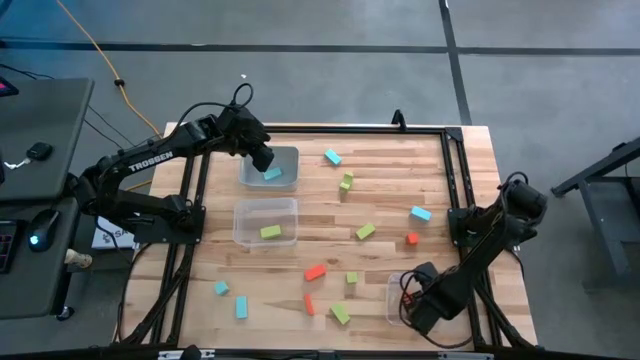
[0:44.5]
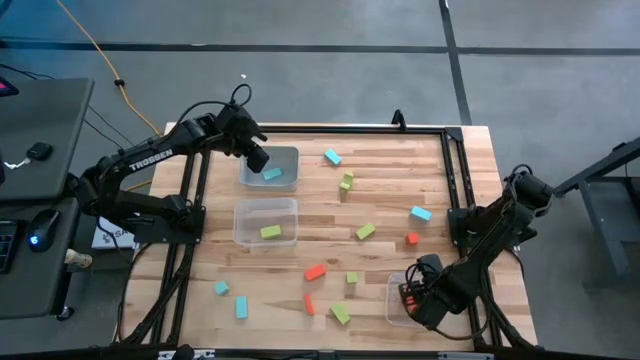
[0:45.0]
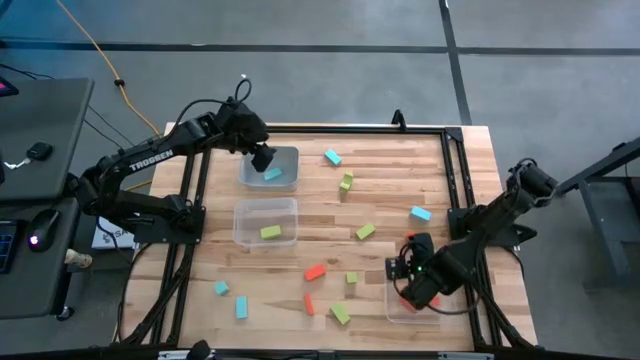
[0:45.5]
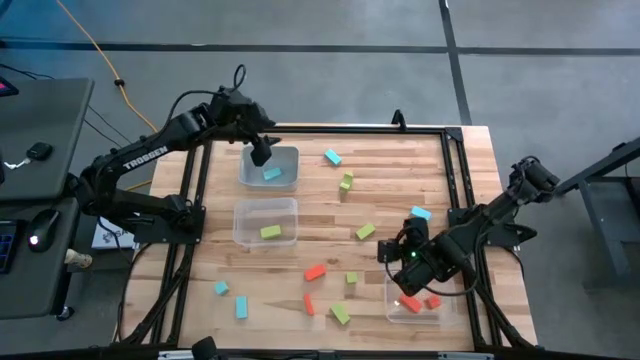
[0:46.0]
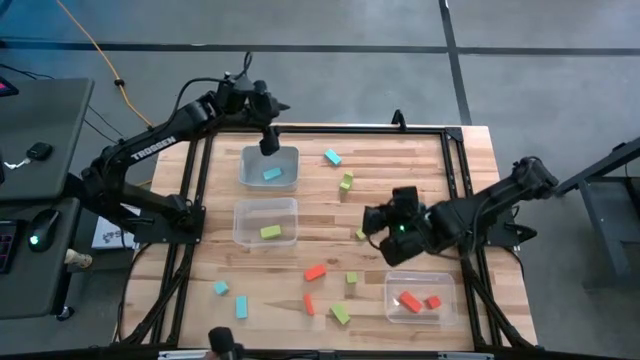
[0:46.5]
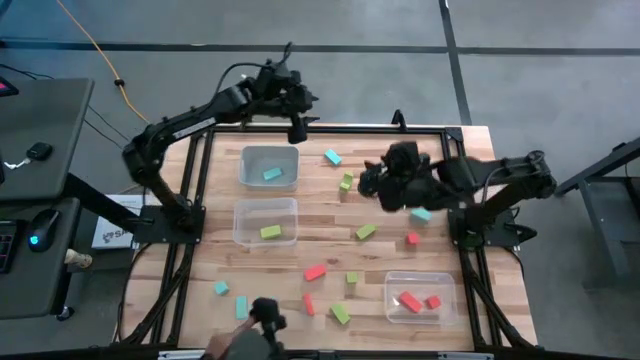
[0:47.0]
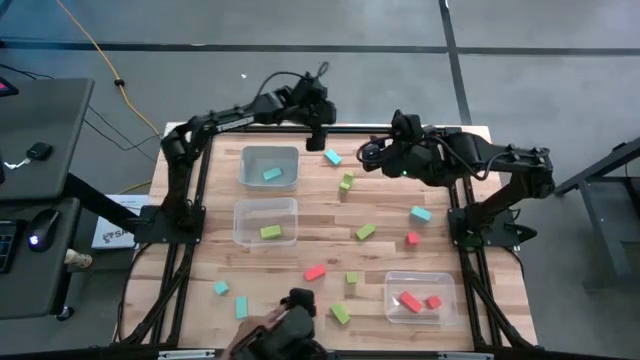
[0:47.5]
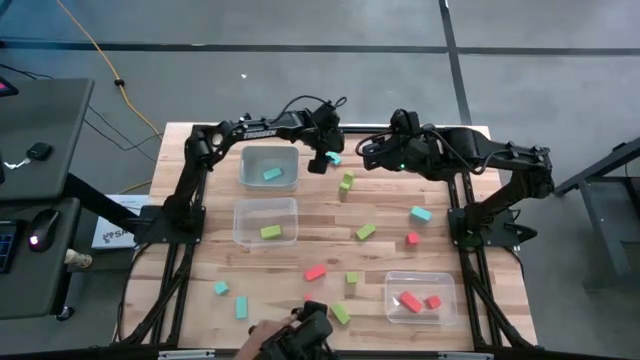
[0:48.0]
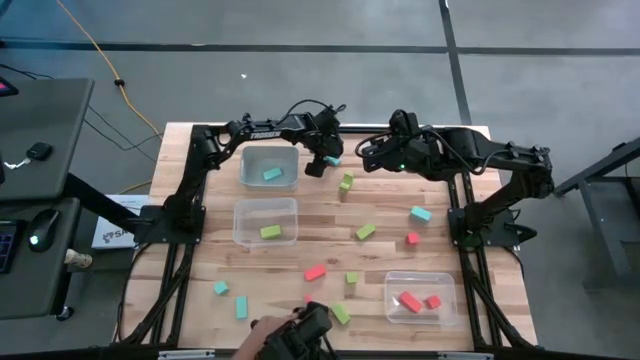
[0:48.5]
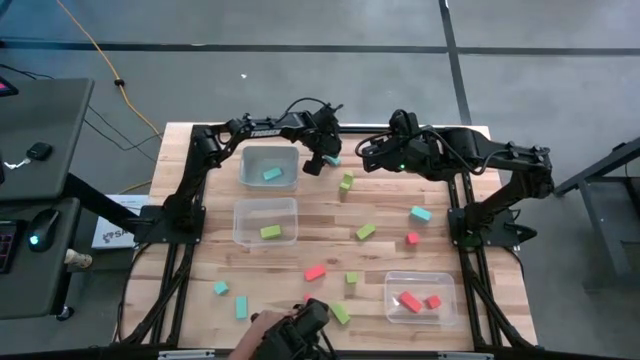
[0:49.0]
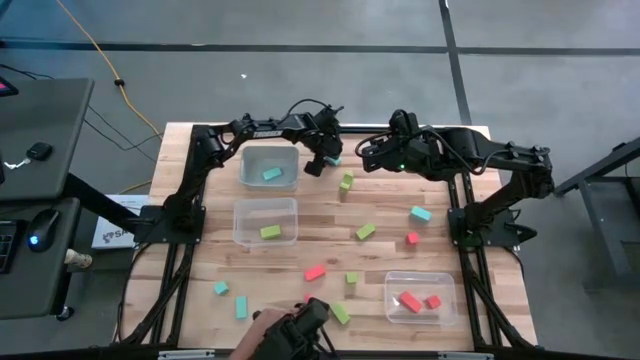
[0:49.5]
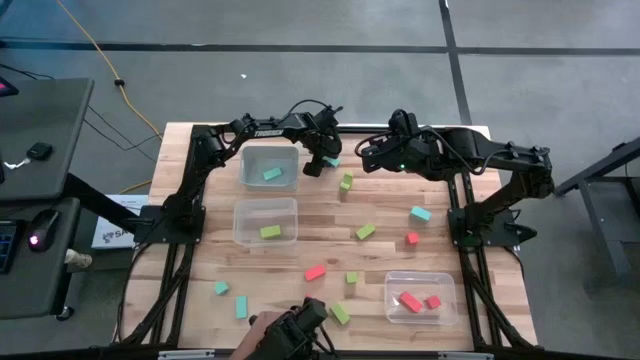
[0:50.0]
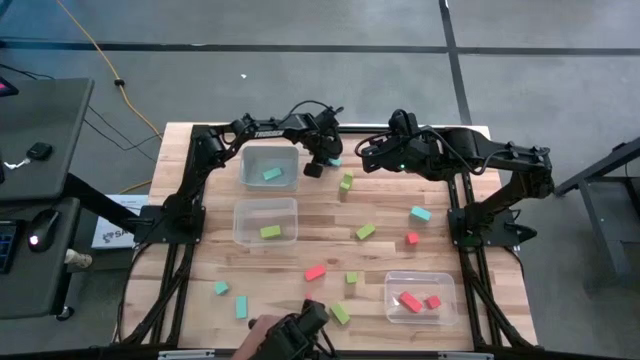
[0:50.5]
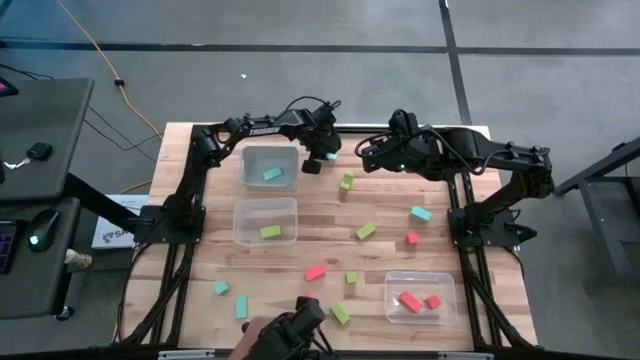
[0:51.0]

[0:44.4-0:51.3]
Task: Sort & place blocks by color
Put the blue block into the gray bin

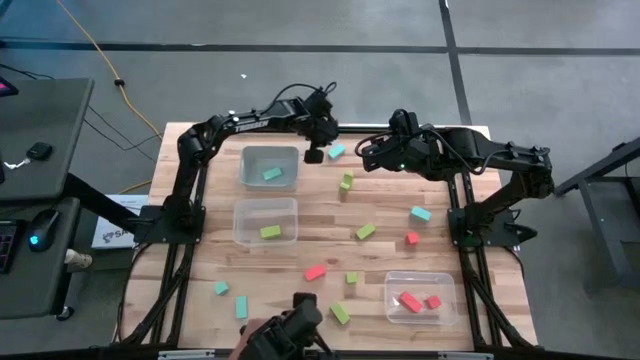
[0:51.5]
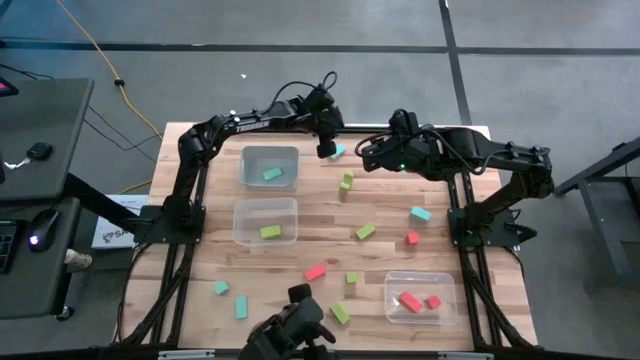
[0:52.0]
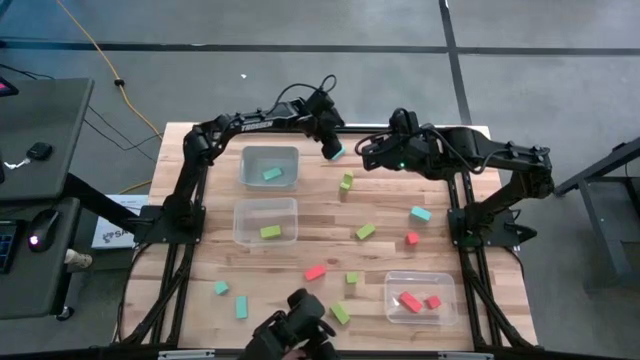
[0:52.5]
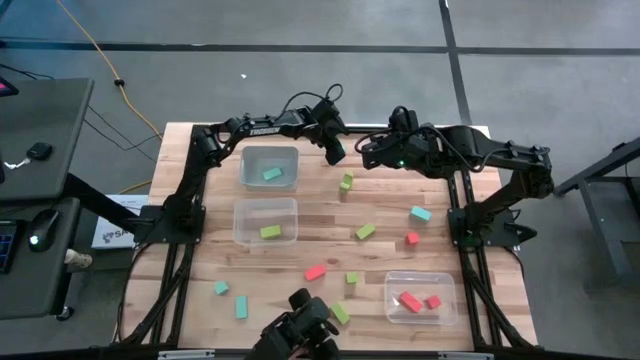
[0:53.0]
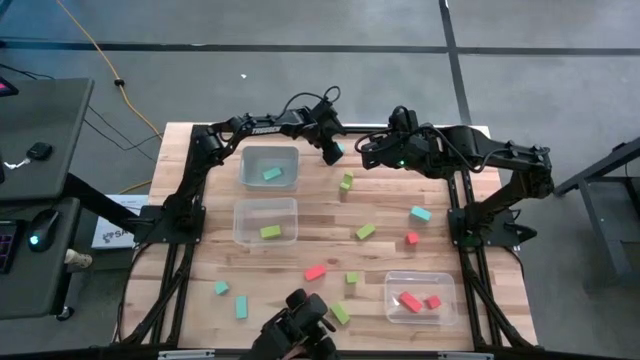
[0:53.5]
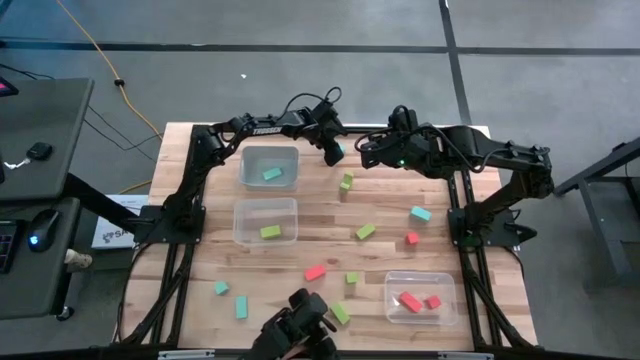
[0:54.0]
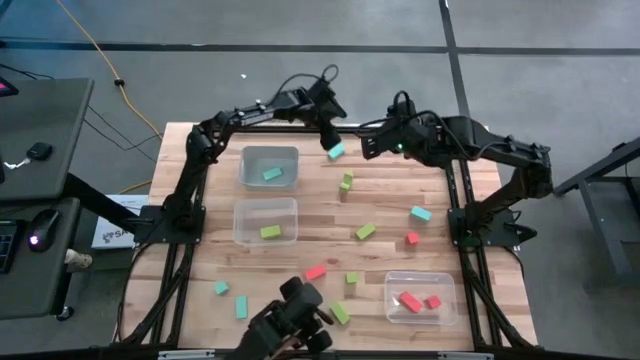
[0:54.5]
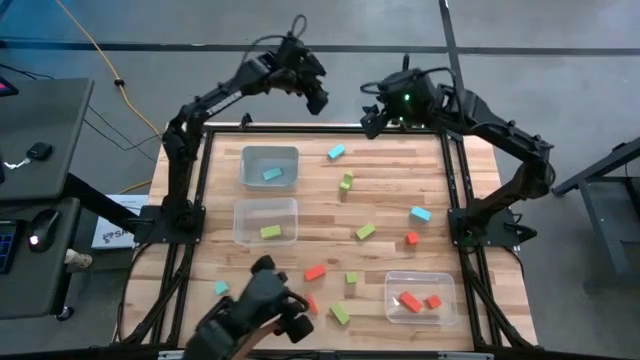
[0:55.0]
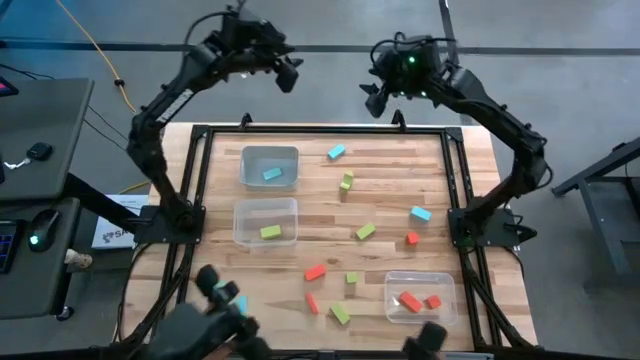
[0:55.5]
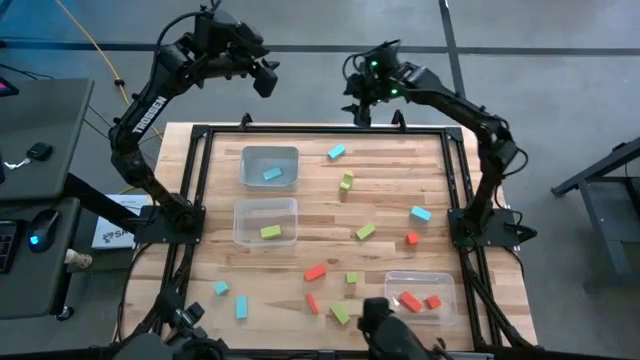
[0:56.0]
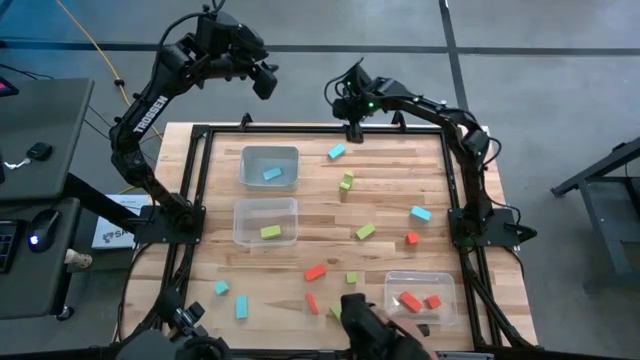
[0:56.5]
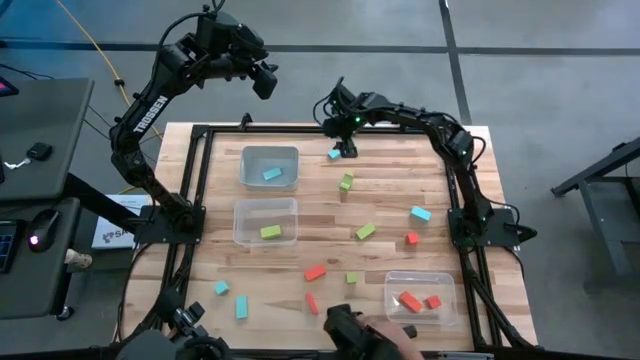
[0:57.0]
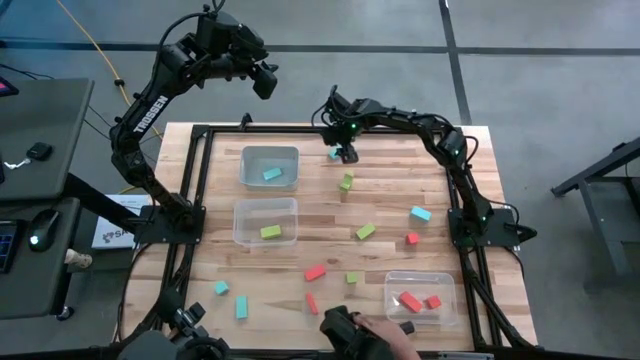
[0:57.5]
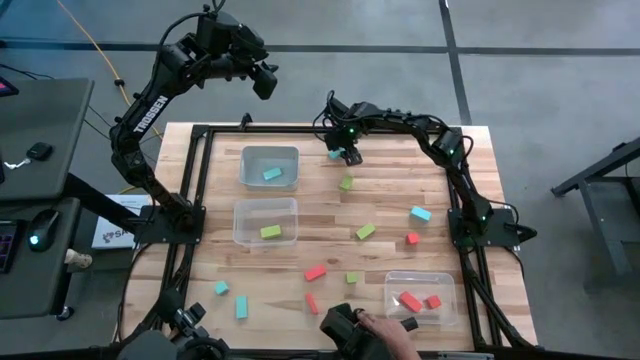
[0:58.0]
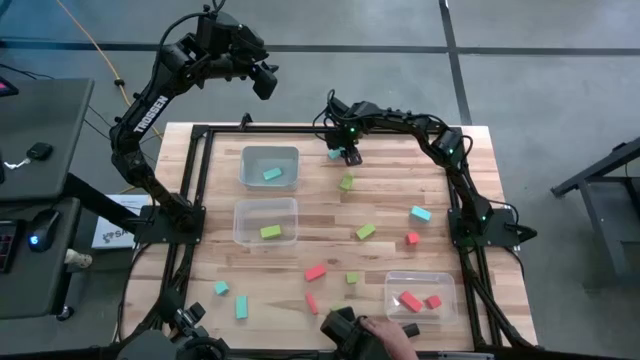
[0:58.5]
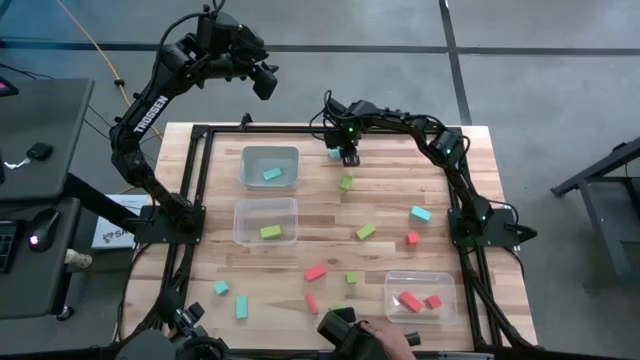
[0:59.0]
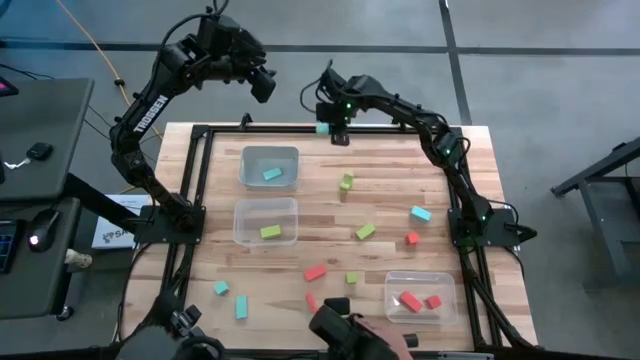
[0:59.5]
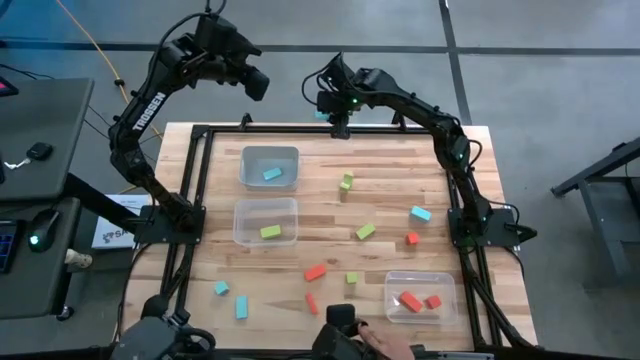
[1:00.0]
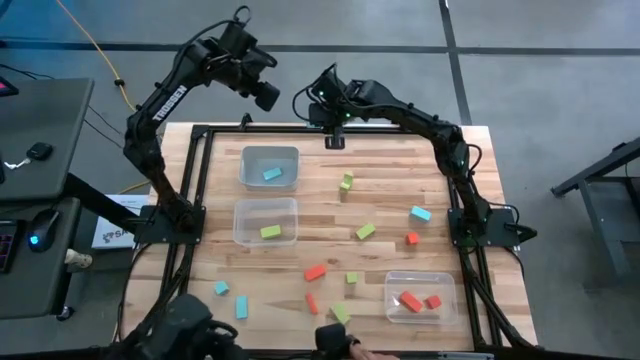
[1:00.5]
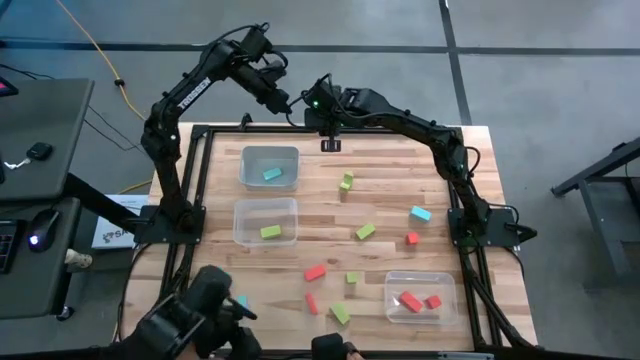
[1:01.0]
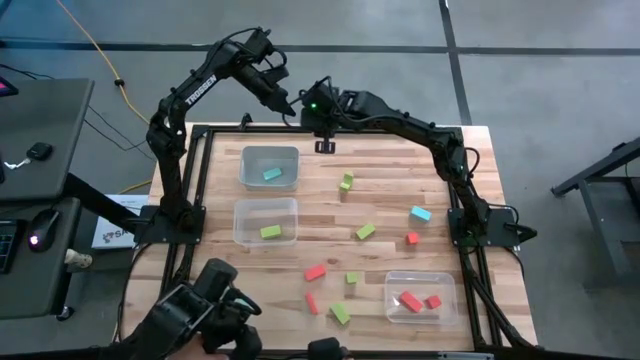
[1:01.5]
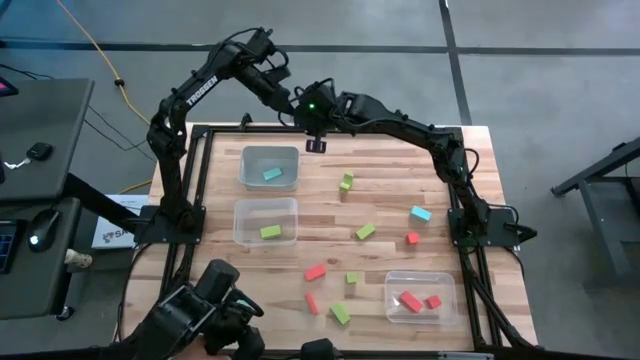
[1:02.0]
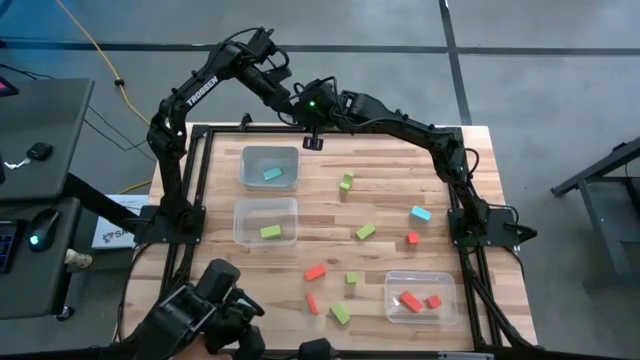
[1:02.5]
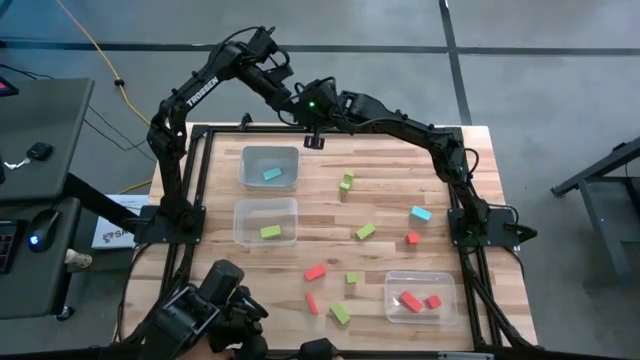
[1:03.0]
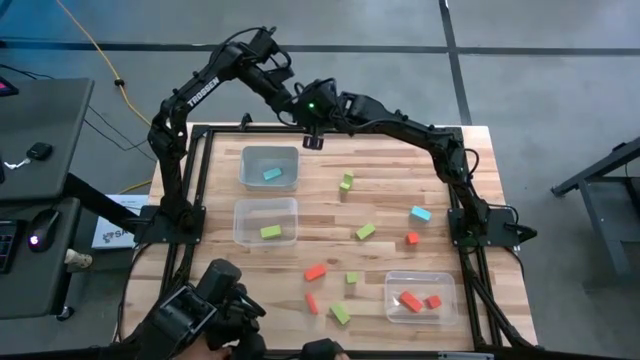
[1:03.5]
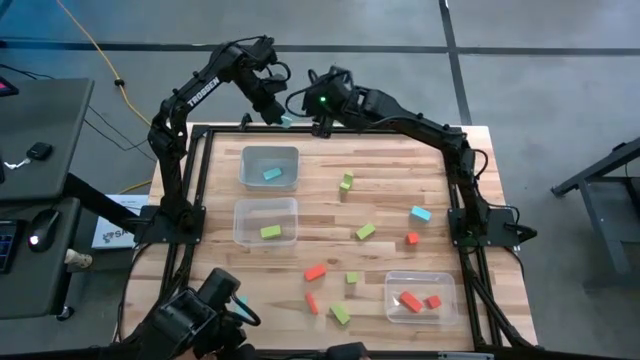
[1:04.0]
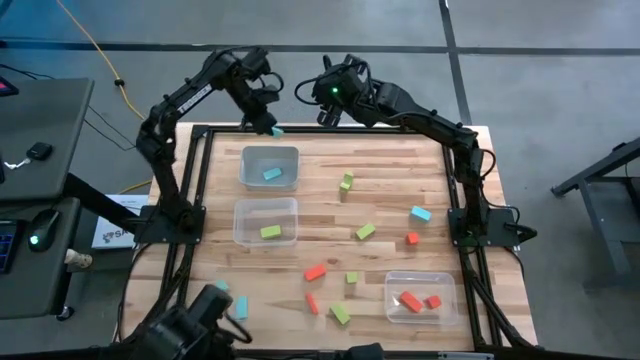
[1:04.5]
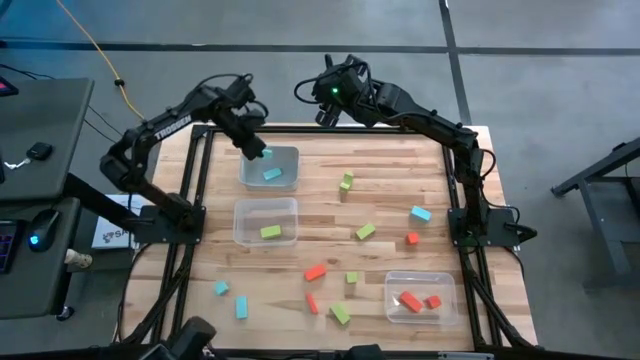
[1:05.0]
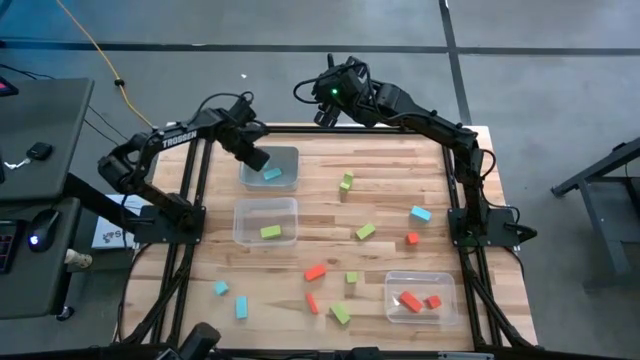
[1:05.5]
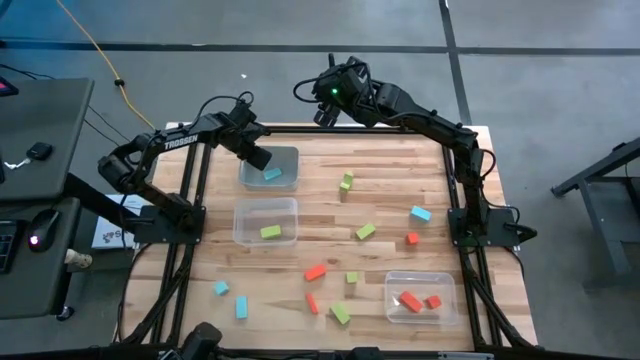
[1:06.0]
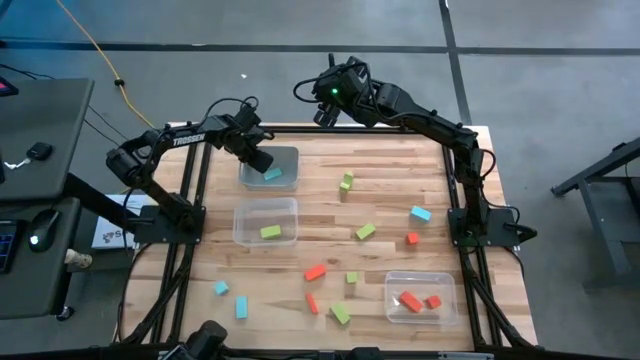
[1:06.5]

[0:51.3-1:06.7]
Put the blue block into the gray bin
